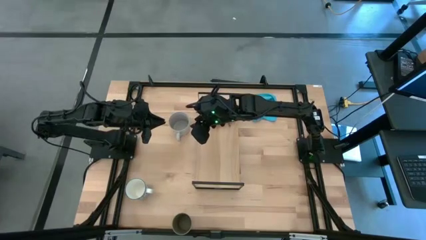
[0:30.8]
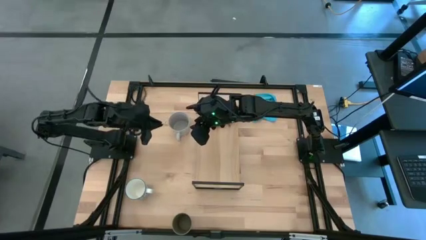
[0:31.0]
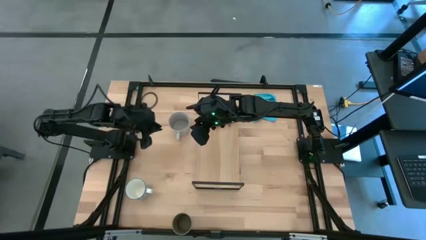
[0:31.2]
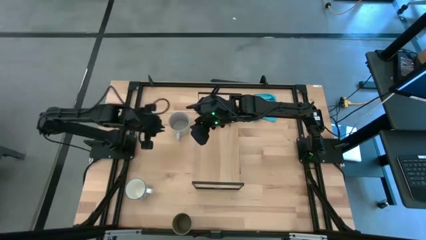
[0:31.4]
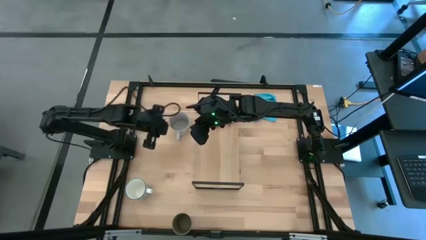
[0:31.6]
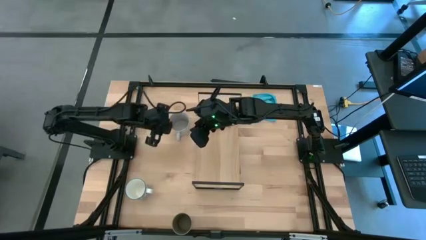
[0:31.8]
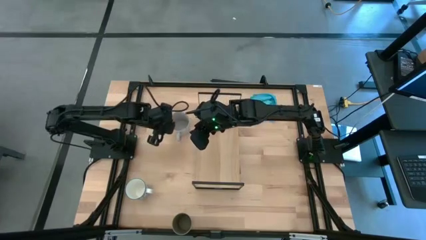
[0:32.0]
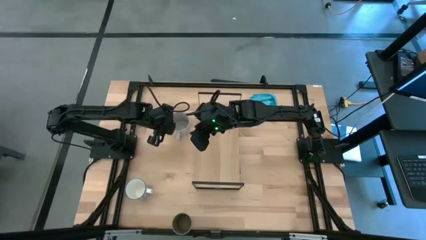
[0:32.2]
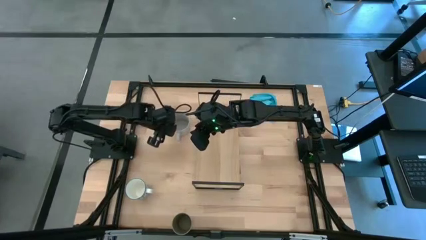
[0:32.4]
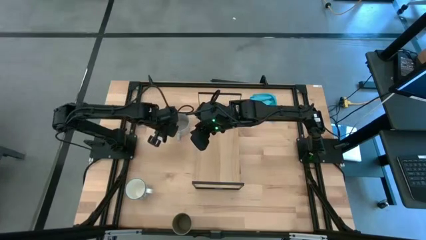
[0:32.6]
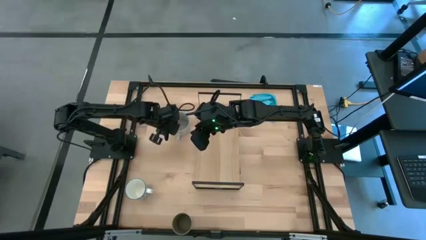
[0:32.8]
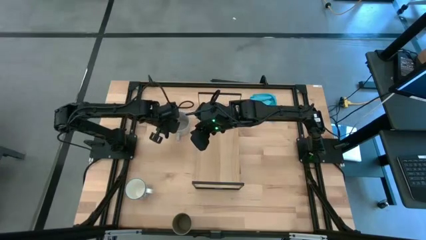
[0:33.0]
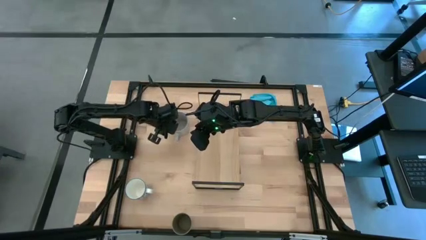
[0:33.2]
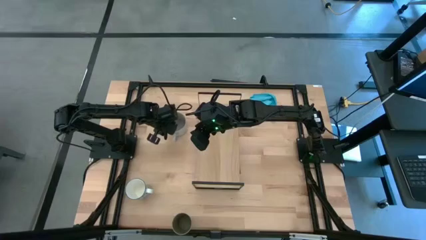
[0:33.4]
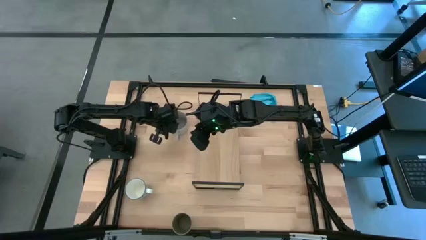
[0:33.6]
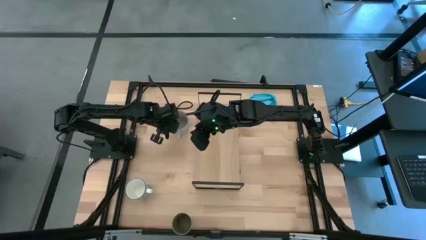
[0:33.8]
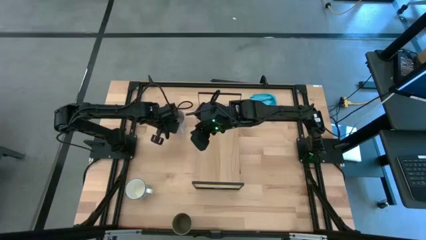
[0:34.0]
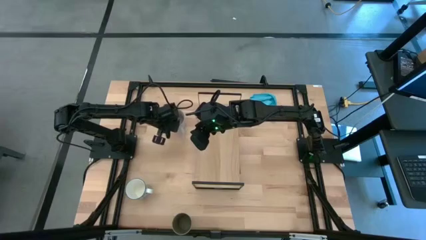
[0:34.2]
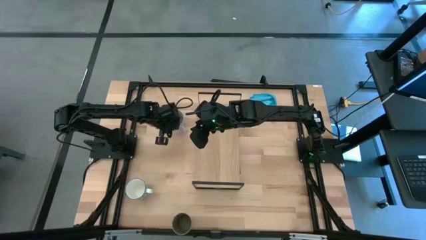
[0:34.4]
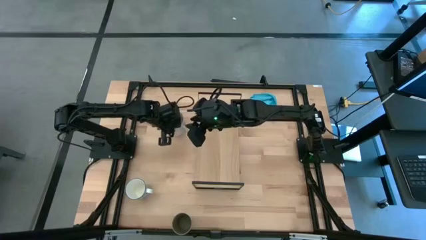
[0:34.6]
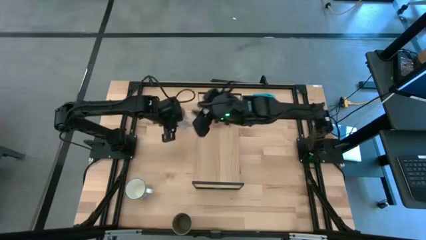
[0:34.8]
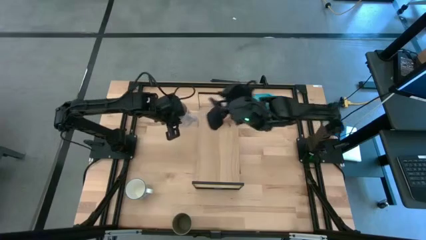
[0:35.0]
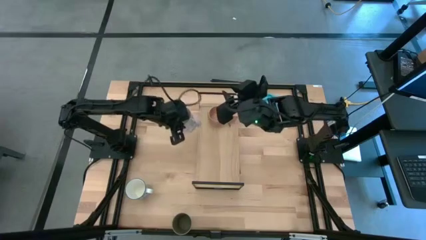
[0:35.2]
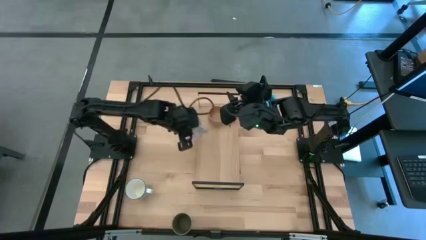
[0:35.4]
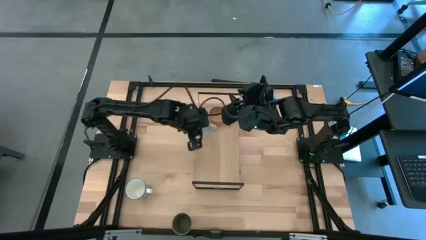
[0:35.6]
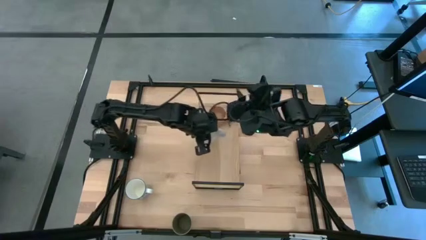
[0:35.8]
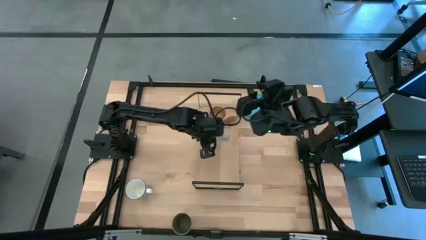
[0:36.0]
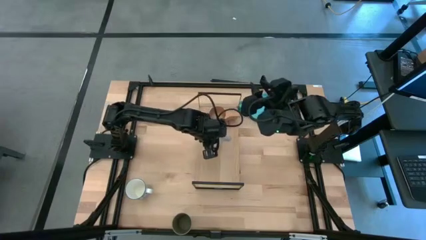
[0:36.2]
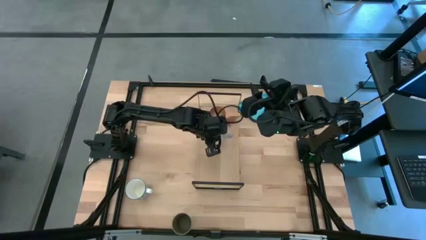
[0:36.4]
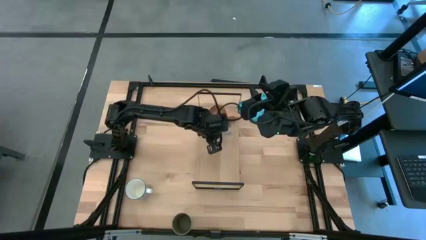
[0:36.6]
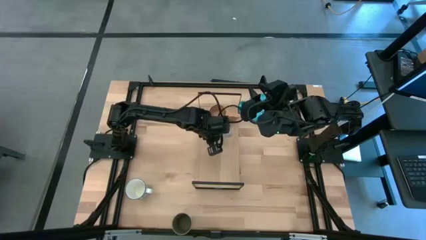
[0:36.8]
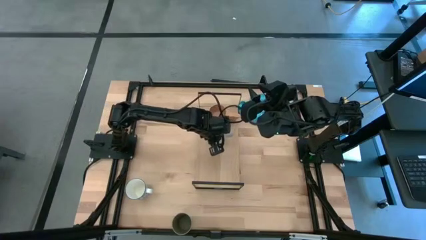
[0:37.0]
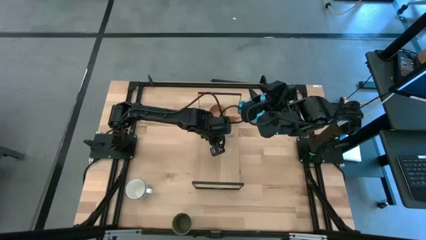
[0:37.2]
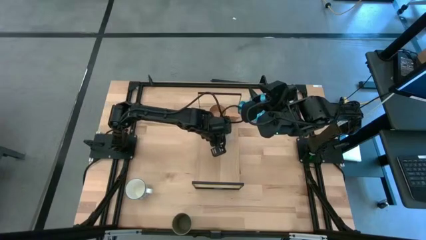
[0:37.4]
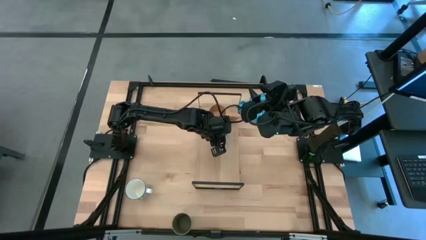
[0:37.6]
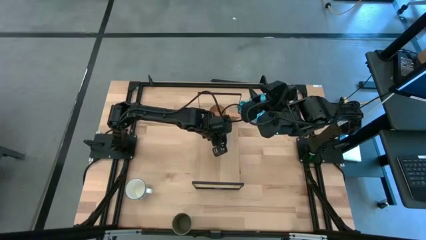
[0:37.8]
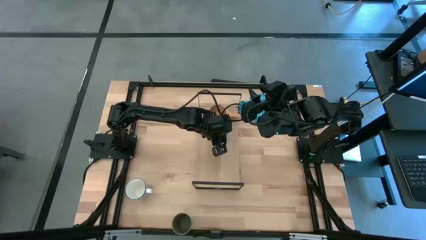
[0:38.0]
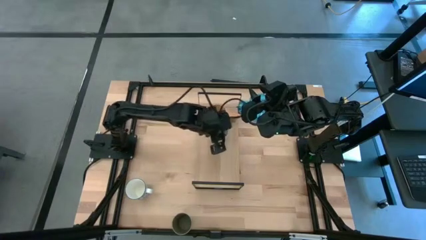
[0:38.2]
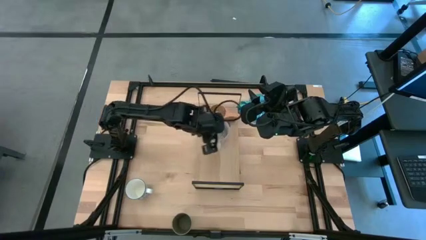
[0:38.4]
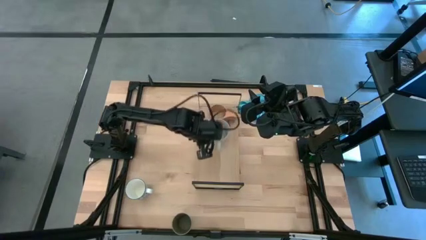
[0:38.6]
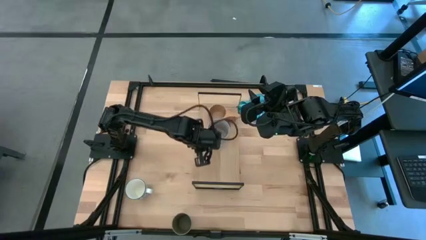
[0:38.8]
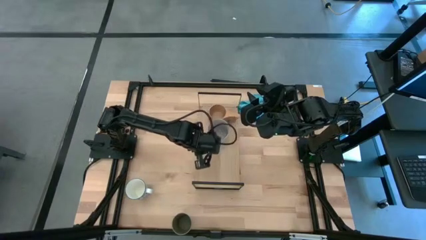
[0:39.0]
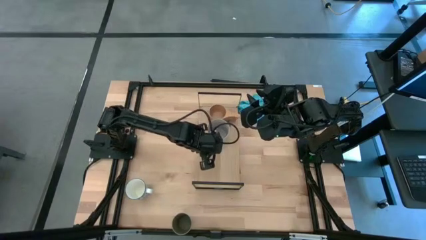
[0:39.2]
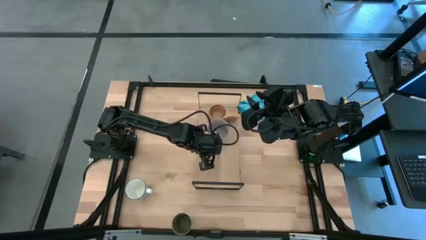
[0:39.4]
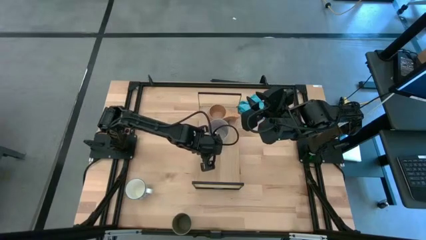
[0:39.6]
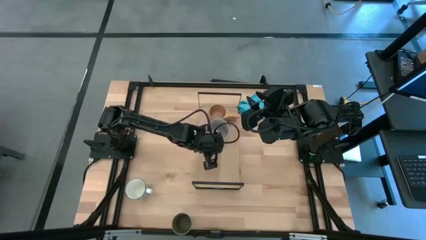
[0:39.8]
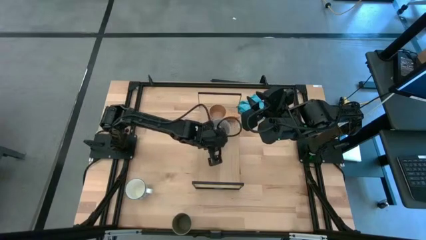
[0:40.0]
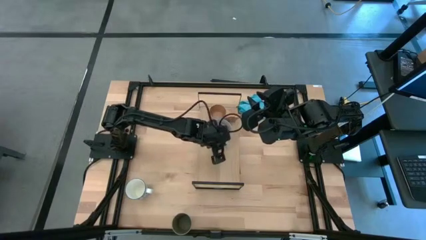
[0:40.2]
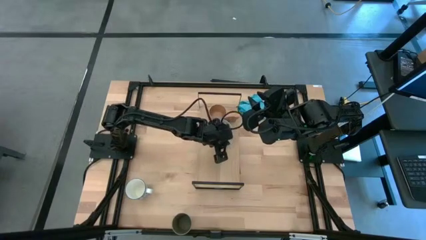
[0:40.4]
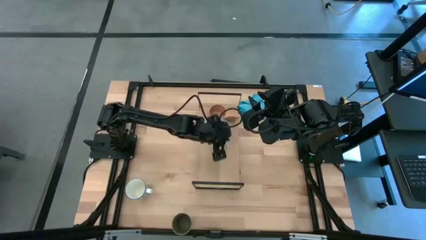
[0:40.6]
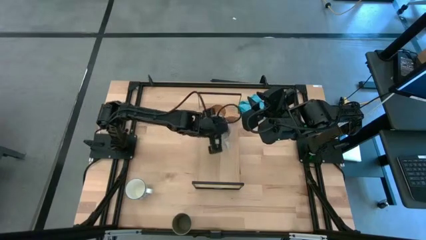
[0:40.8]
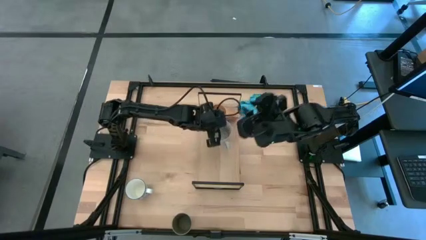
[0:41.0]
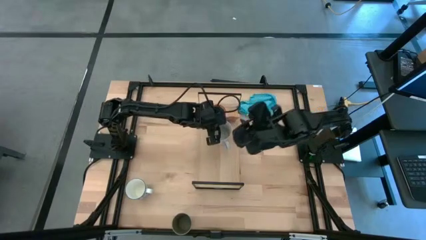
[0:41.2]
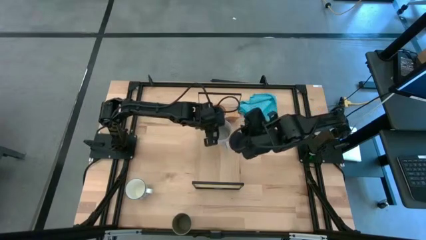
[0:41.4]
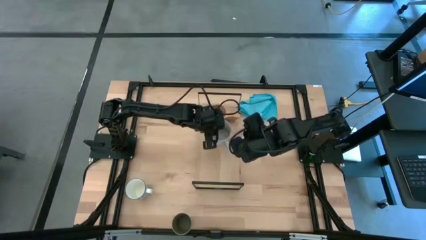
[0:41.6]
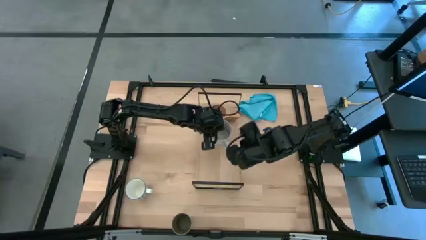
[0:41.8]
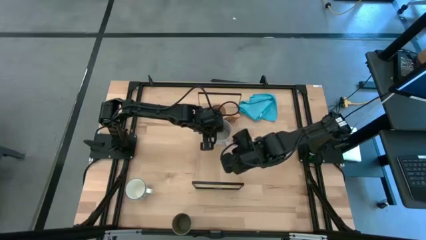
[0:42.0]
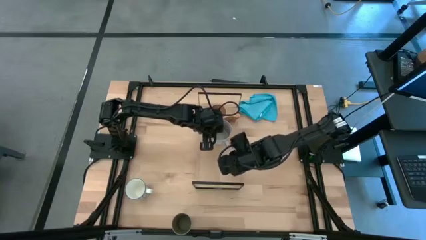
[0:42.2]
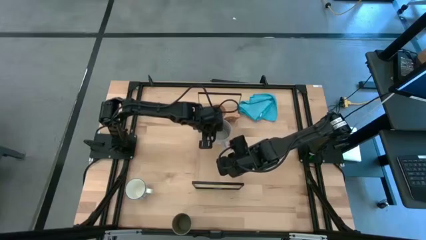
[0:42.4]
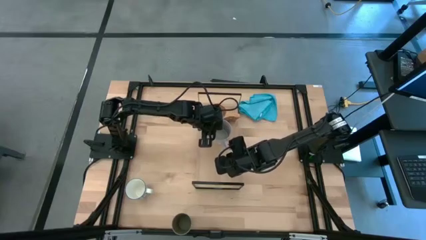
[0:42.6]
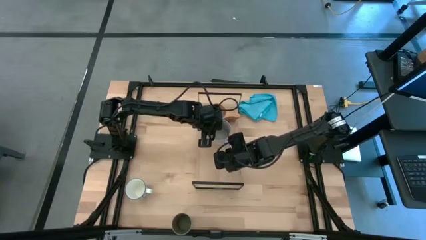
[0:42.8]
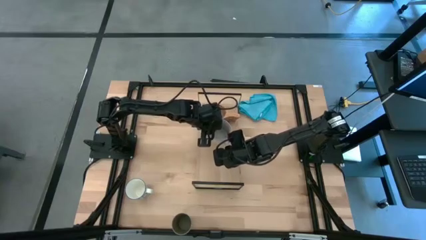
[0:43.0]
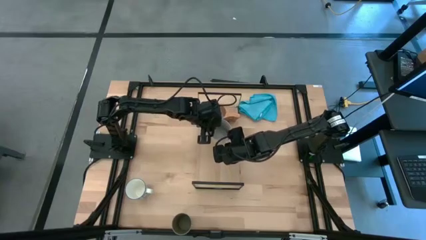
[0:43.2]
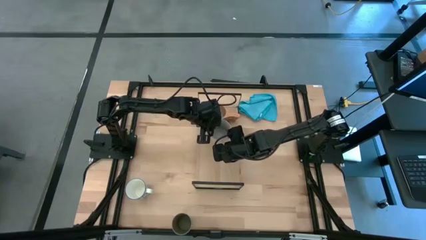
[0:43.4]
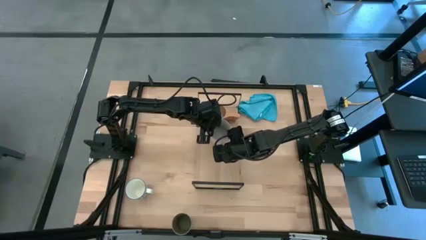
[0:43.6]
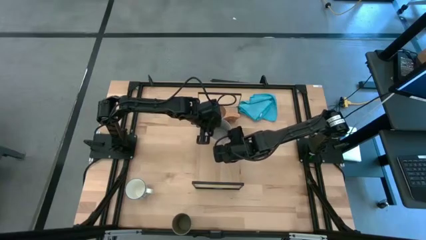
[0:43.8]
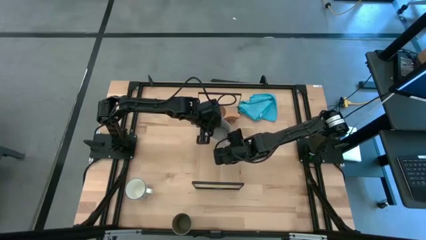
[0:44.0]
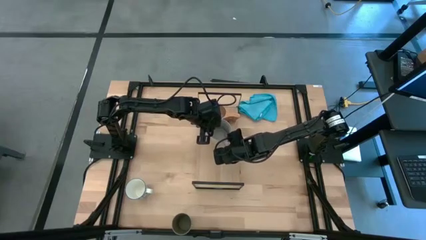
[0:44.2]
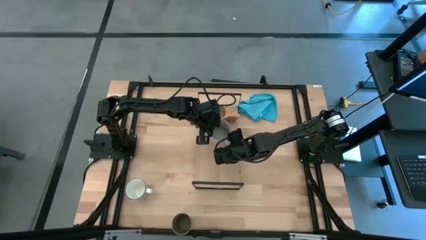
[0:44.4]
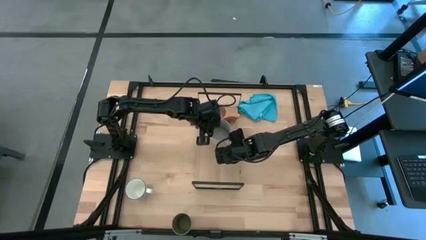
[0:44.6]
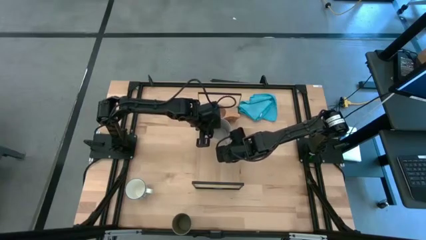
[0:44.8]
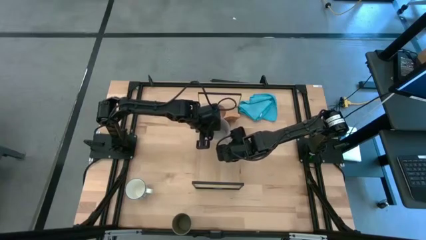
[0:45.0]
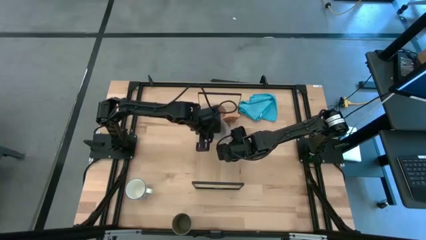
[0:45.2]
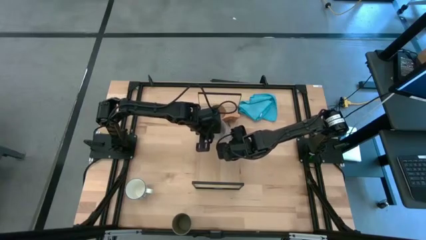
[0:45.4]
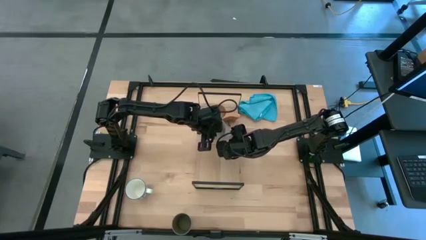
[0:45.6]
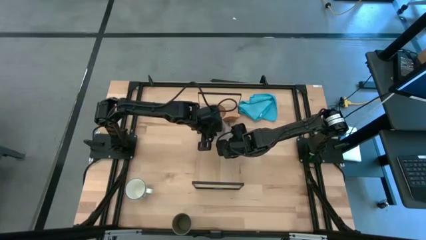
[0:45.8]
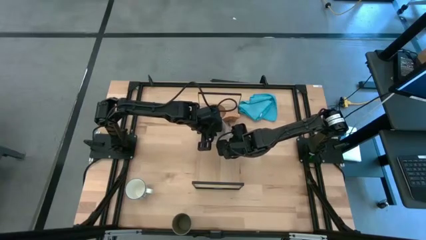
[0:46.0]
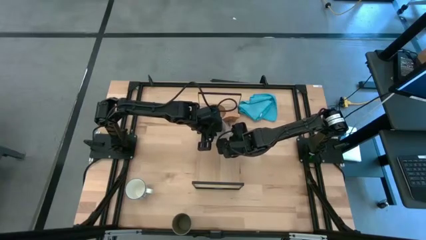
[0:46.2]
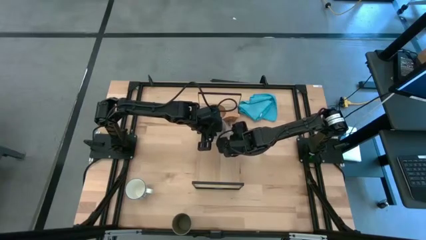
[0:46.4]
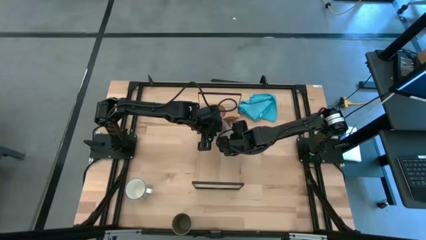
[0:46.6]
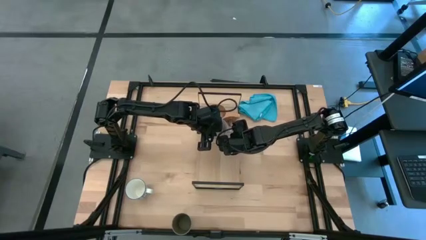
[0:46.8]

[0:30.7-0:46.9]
Task: Stack small to large cups/mugs on shelf
Put the gray mug on the shelf
